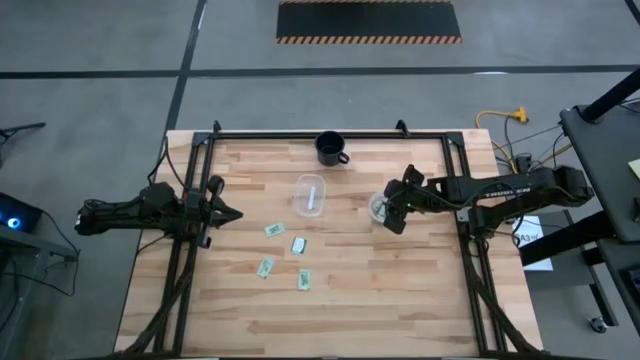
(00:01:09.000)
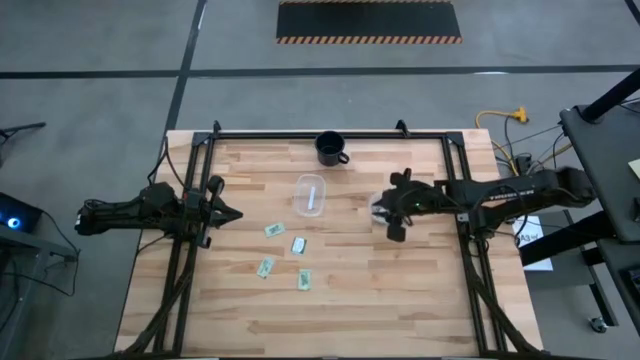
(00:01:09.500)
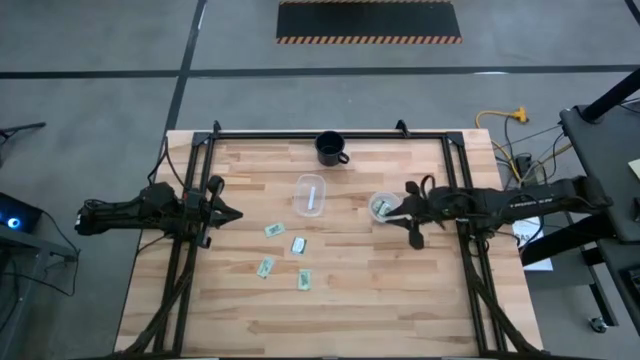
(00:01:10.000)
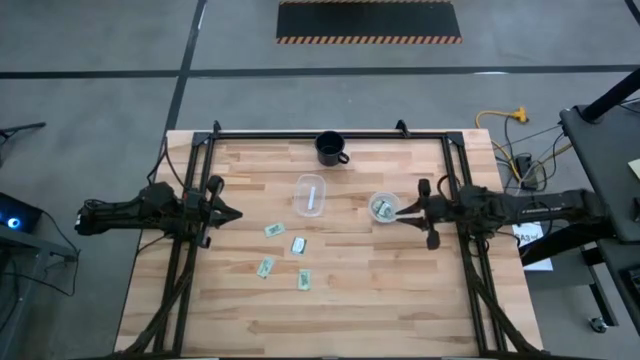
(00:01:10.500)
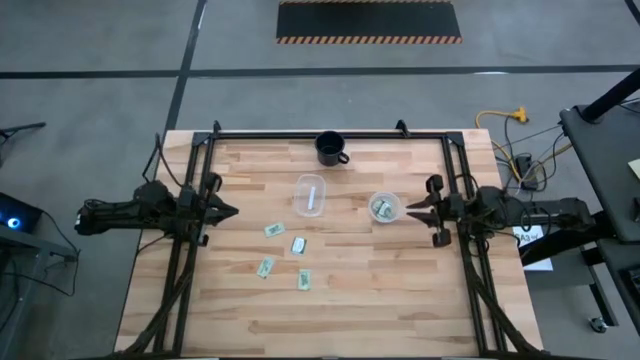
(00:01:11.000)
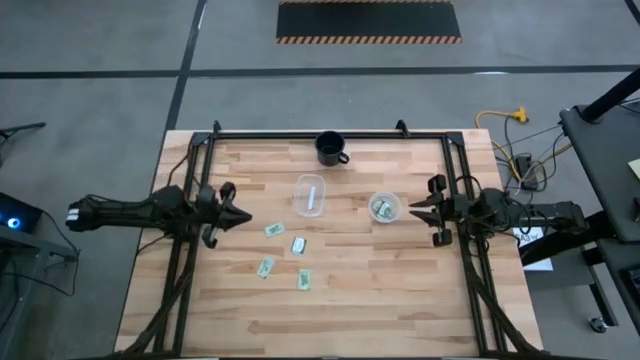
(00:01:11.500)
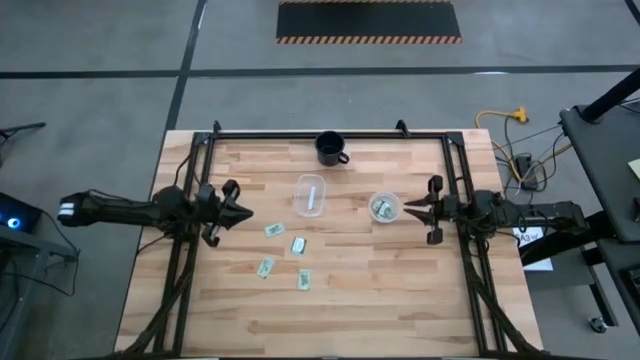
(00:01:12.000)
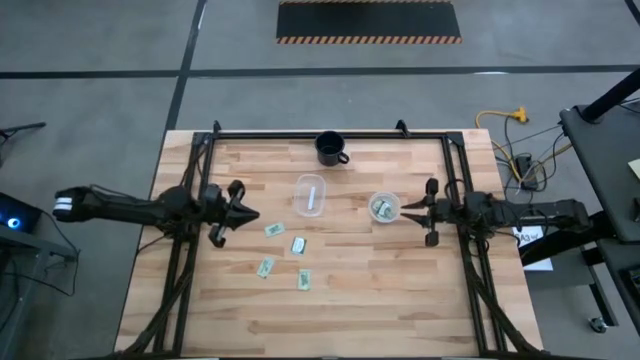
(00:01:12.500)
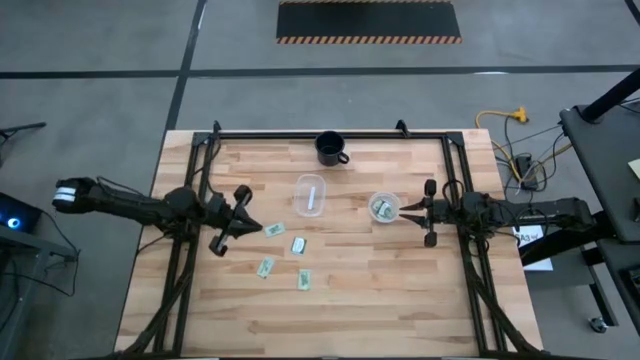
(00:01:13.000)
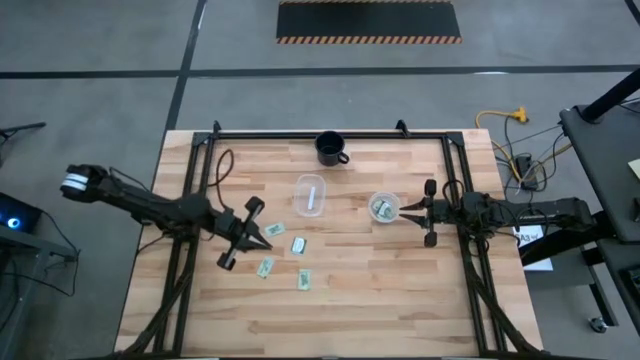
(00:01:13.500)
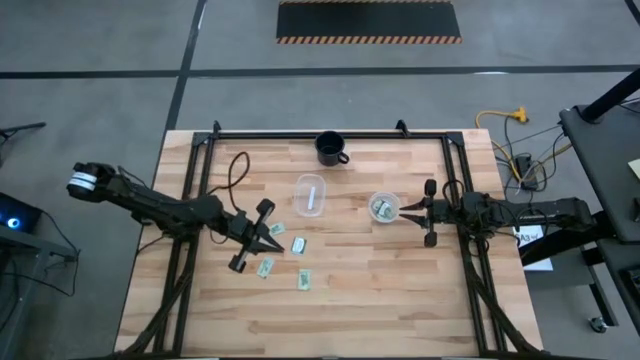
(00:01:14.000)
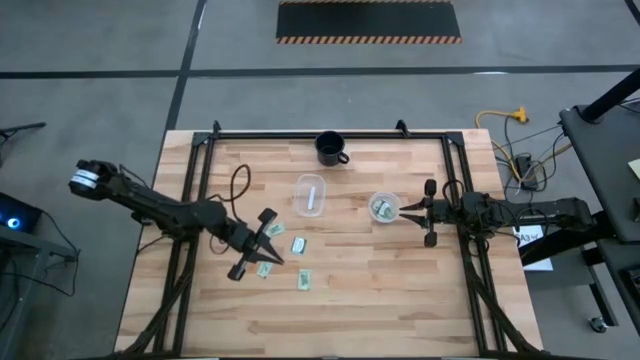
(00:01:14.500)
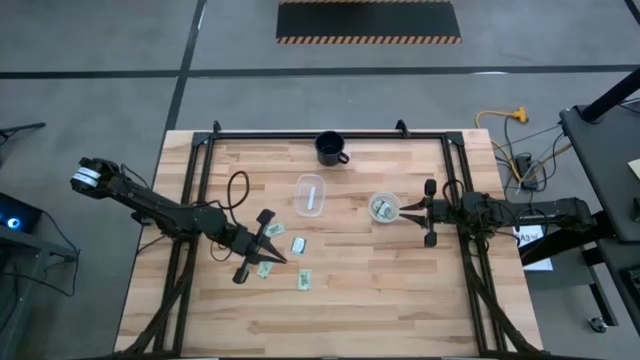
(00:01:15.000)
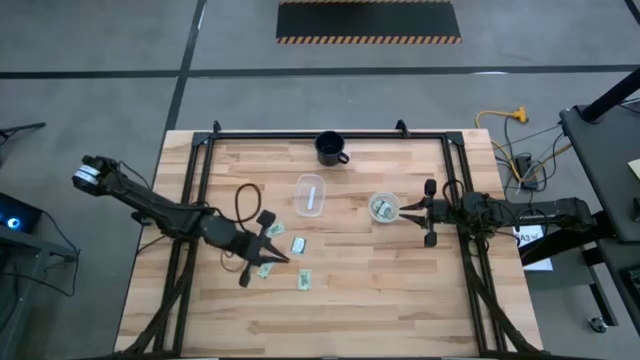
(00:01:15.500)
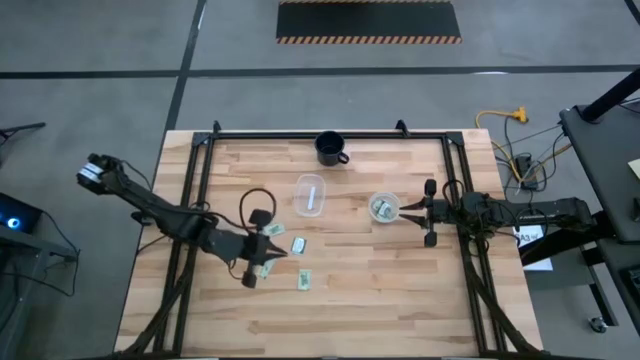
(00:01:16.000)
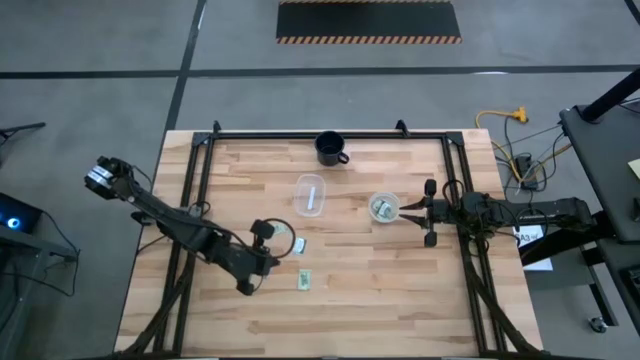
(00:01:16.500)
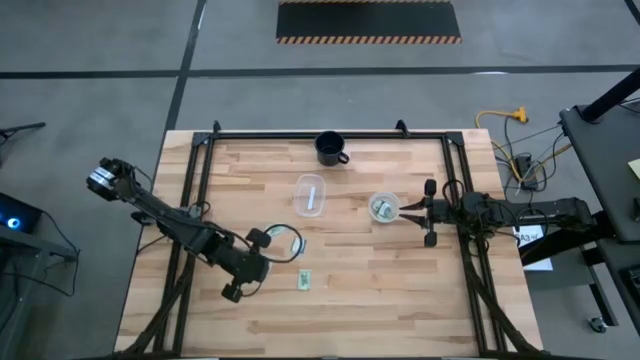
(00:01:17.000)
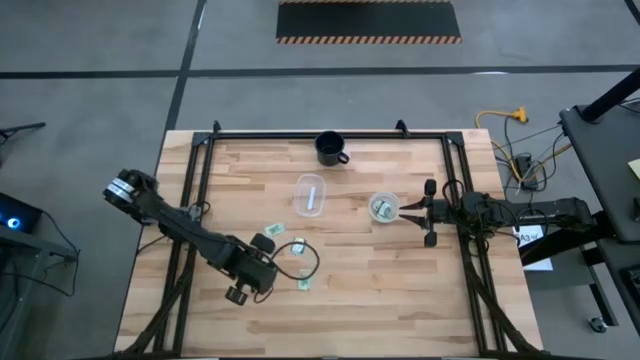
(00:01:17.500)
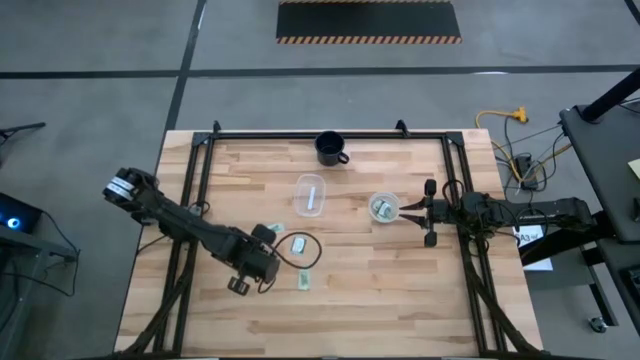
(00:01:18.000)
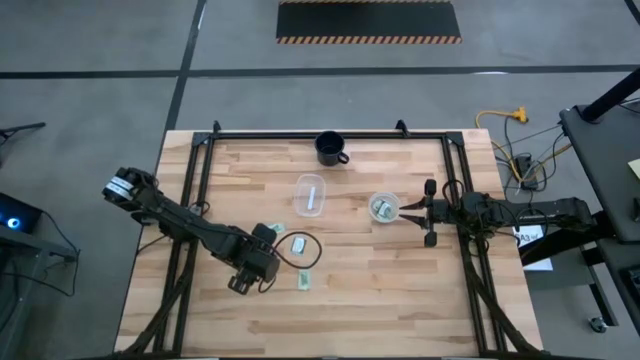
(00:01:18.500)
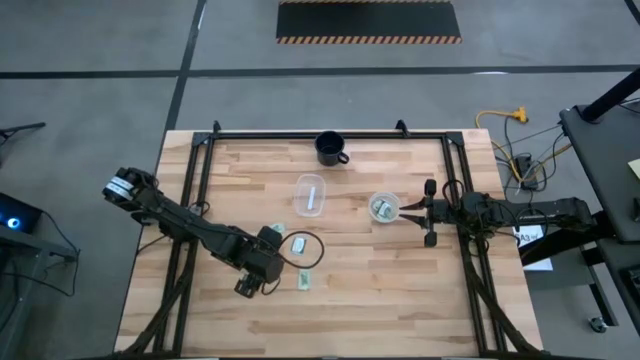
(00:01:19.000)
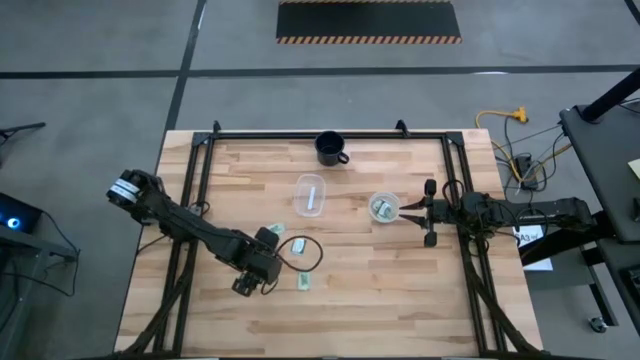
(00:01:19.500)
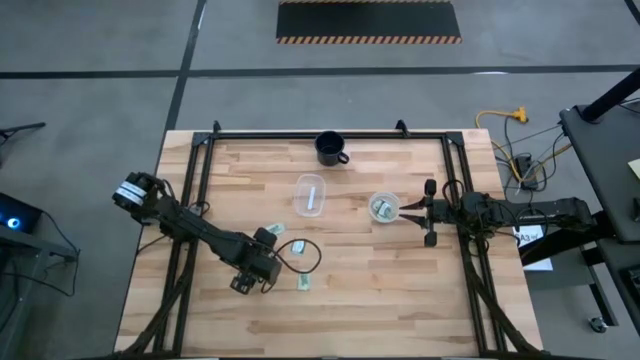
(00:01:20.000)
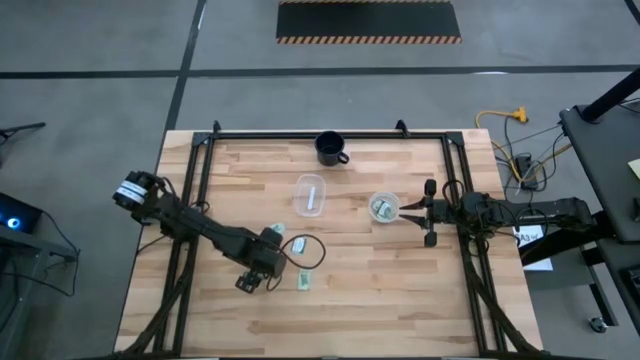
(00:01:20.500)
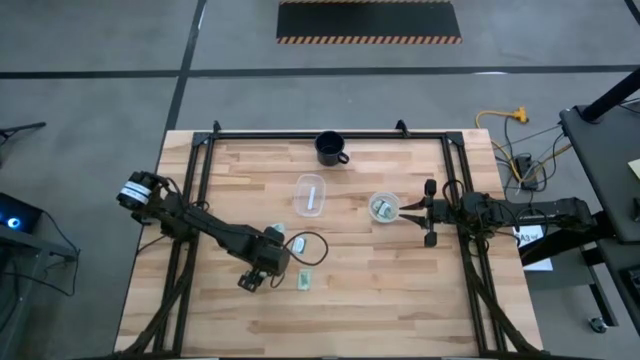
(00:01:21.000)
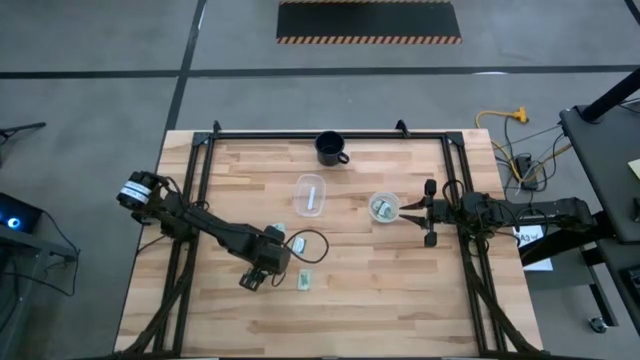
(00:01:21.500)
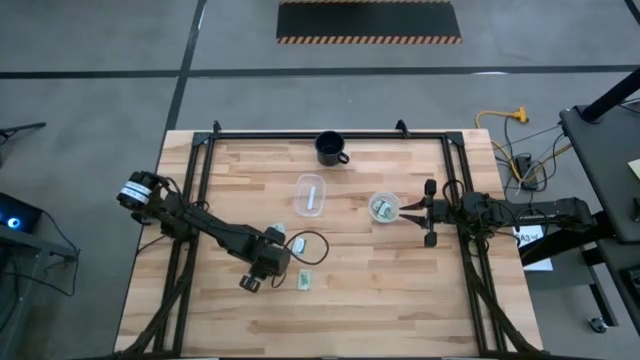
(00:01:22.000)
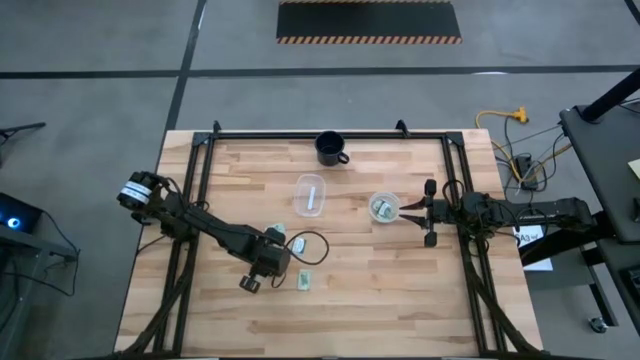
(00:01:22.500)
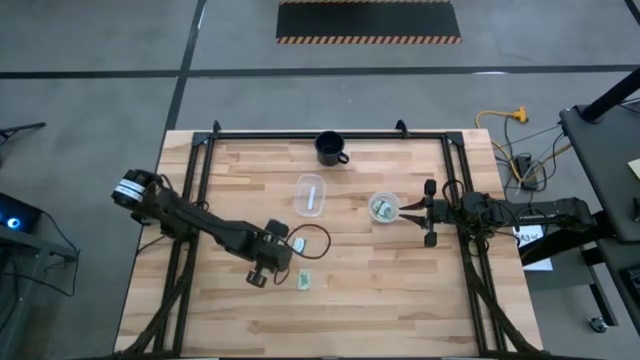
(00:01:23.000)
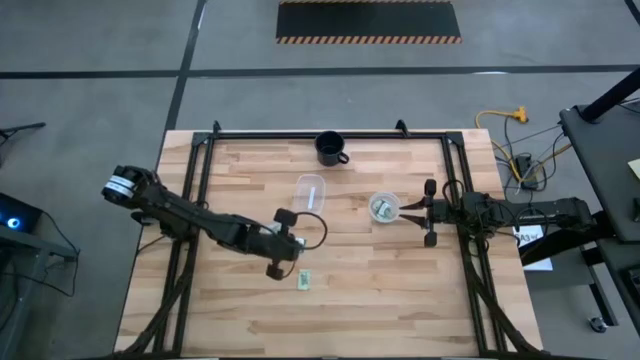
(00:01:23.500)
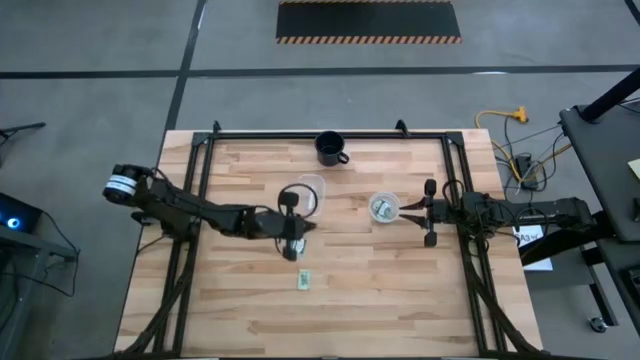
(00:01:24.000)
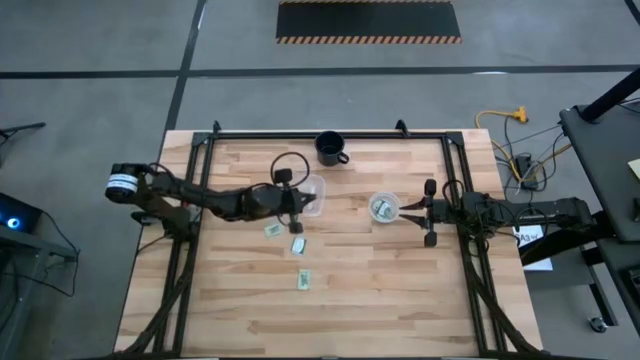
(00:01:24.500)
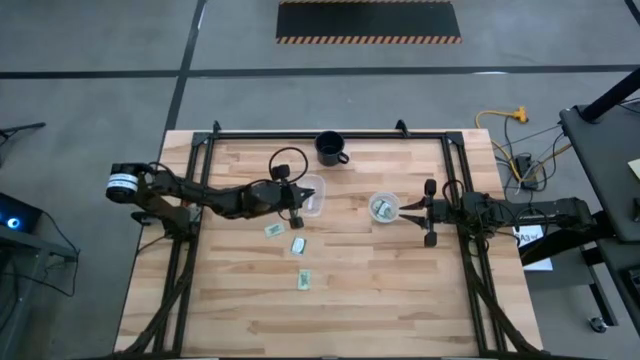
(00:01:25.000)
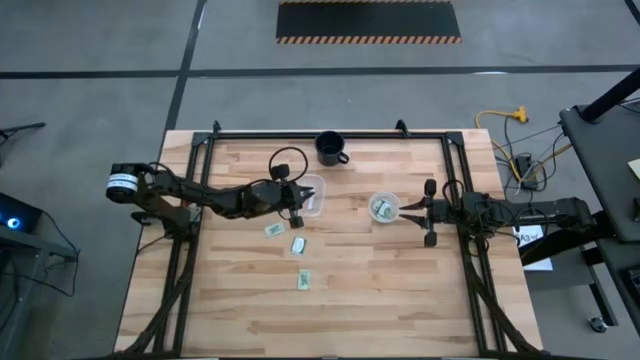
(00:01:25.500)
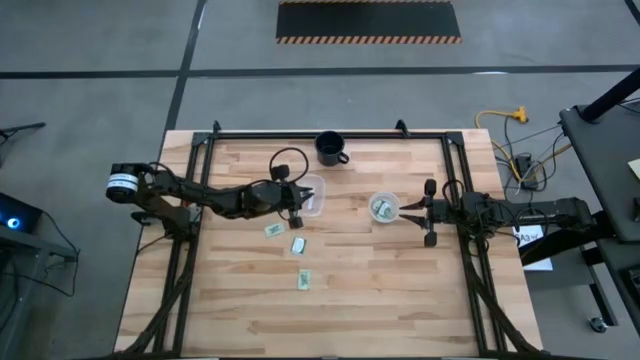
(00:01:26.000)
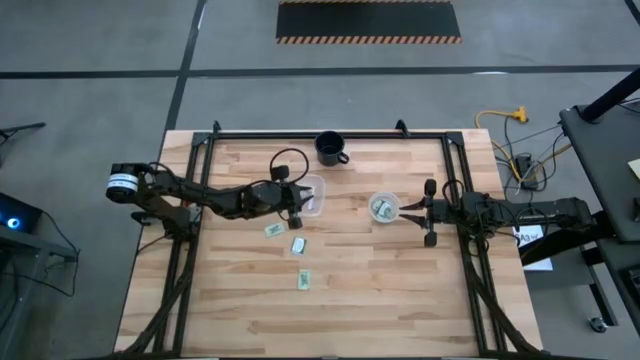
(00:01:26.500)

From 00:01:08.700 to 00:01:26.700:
Task: Pick and place items into bin
Put the white stevia packet into the left transparent bin
